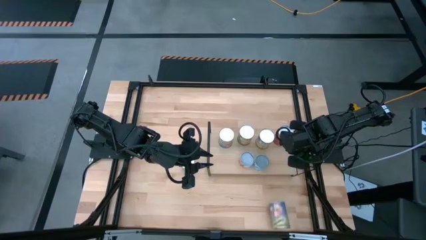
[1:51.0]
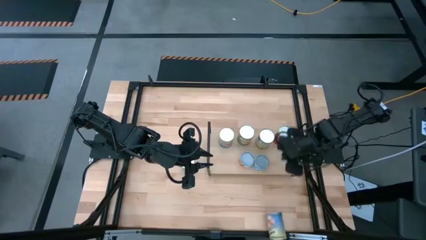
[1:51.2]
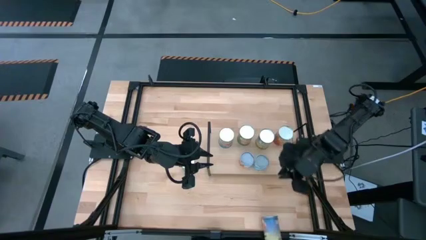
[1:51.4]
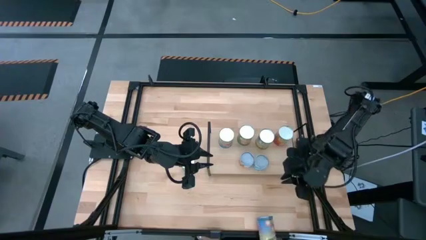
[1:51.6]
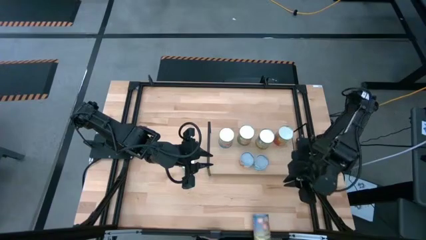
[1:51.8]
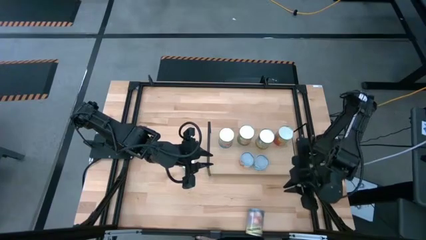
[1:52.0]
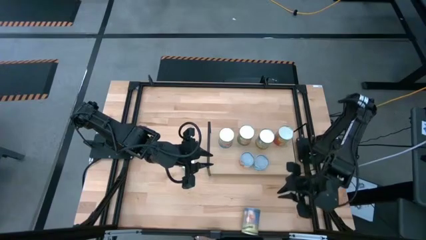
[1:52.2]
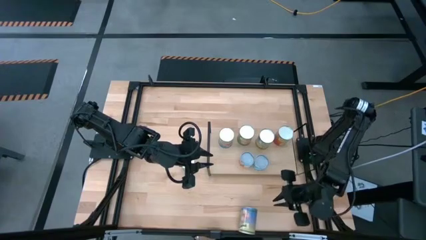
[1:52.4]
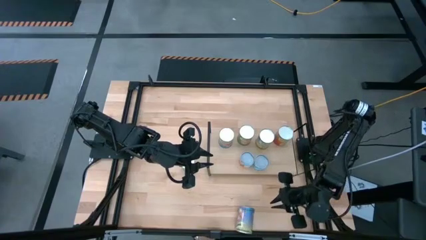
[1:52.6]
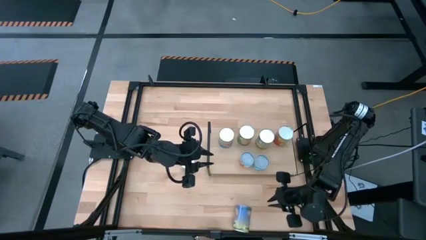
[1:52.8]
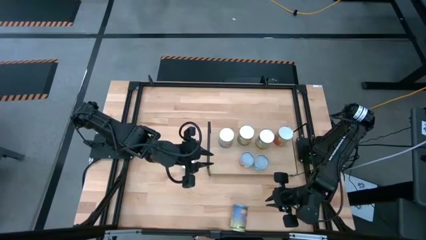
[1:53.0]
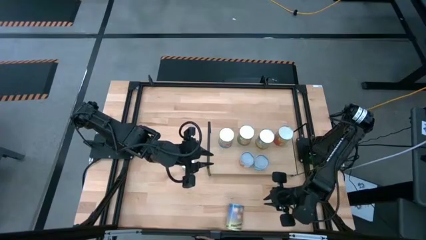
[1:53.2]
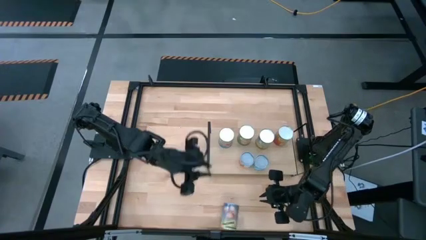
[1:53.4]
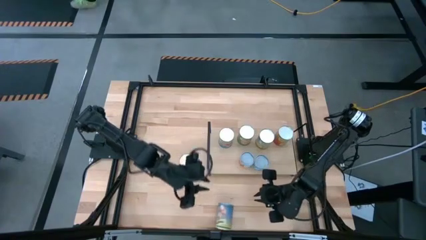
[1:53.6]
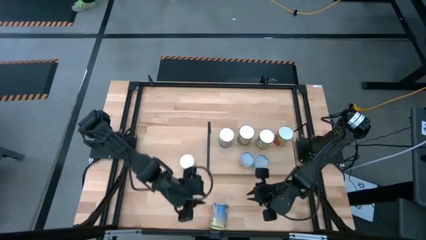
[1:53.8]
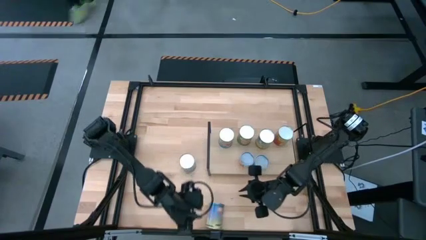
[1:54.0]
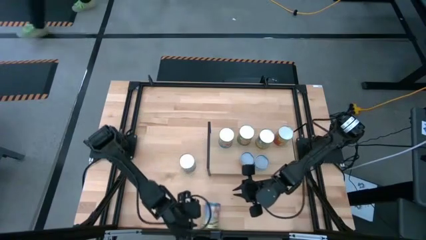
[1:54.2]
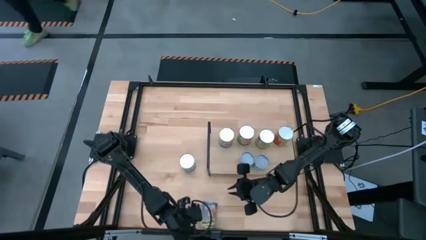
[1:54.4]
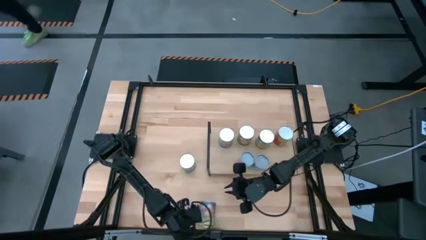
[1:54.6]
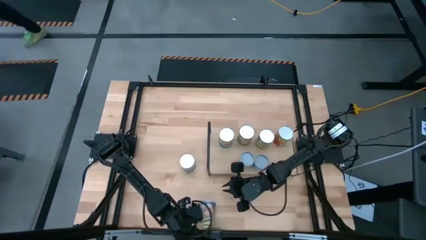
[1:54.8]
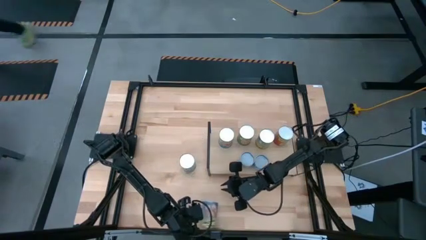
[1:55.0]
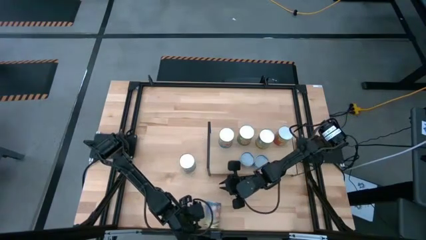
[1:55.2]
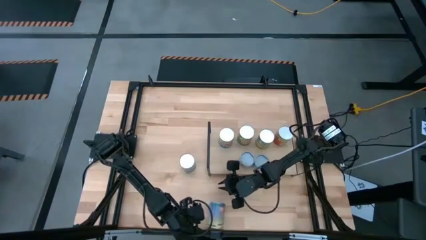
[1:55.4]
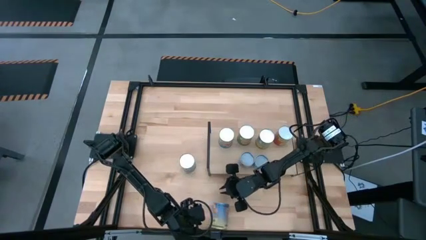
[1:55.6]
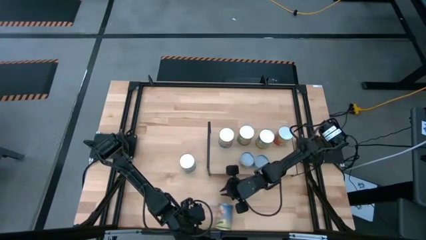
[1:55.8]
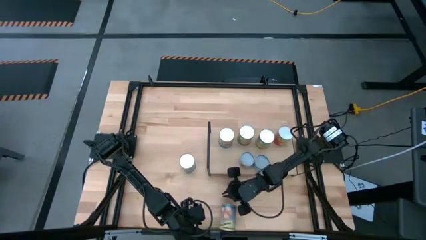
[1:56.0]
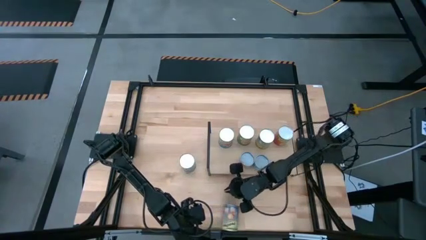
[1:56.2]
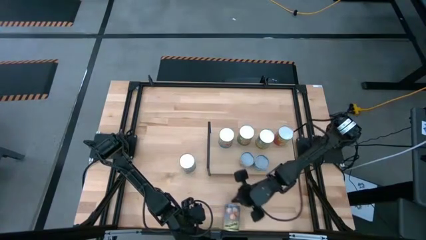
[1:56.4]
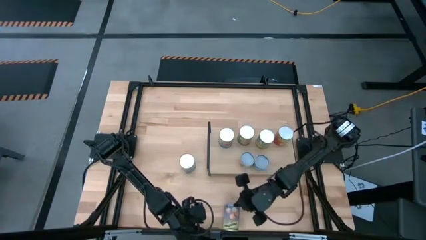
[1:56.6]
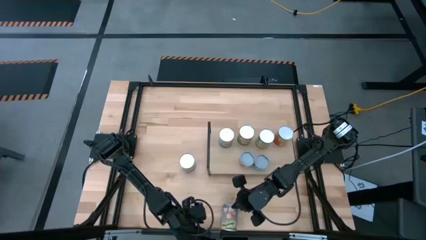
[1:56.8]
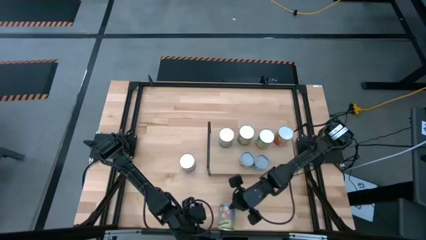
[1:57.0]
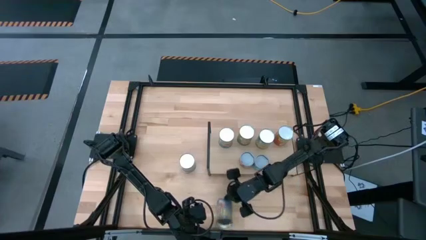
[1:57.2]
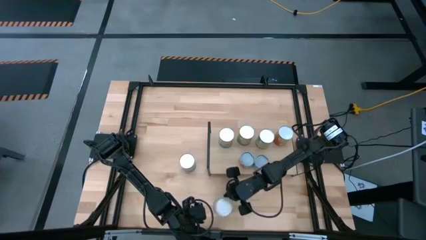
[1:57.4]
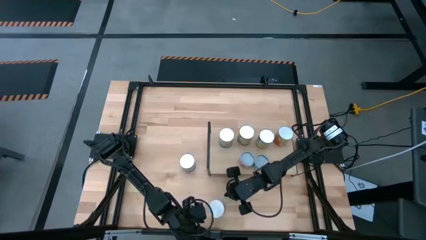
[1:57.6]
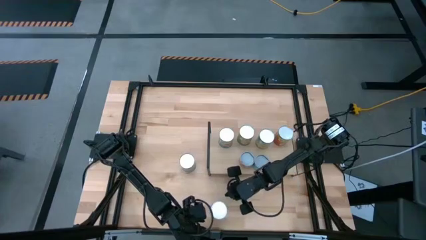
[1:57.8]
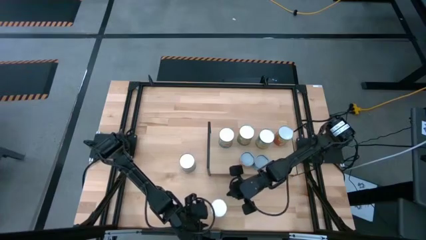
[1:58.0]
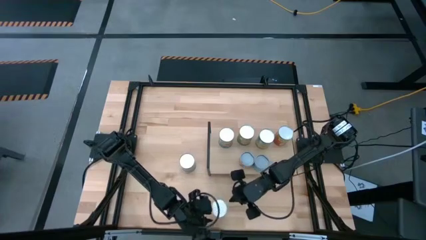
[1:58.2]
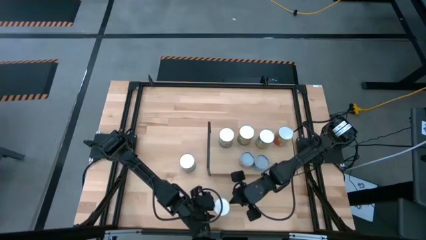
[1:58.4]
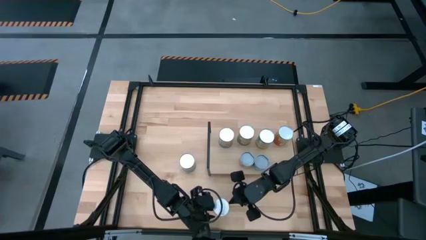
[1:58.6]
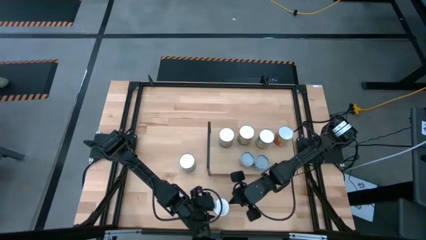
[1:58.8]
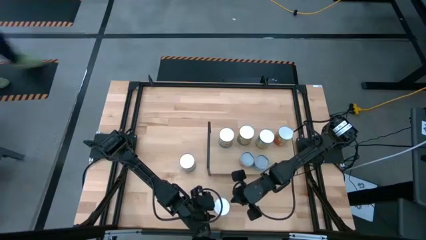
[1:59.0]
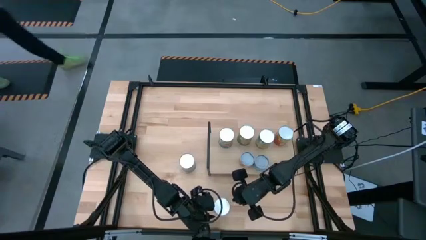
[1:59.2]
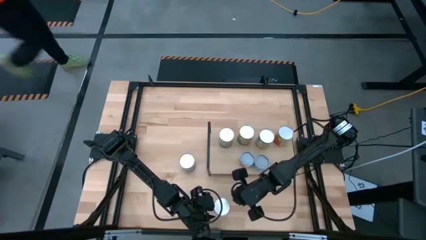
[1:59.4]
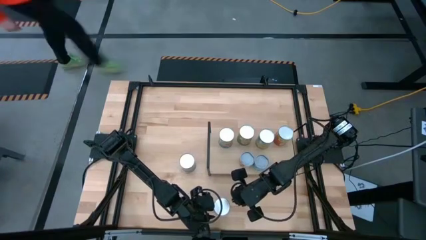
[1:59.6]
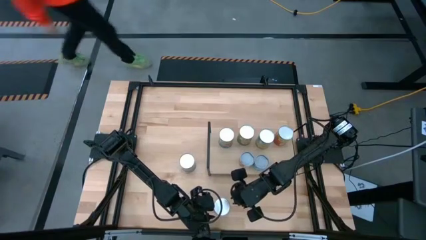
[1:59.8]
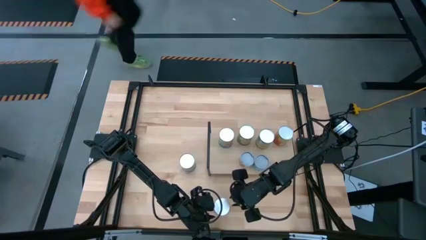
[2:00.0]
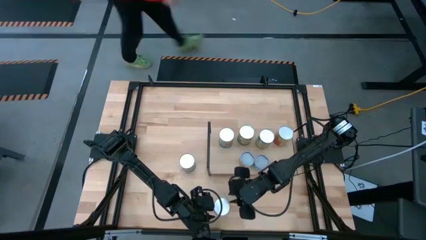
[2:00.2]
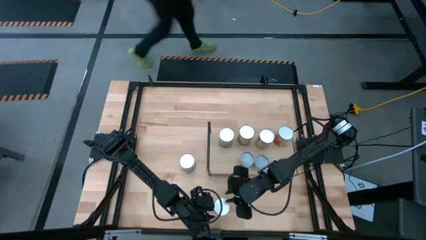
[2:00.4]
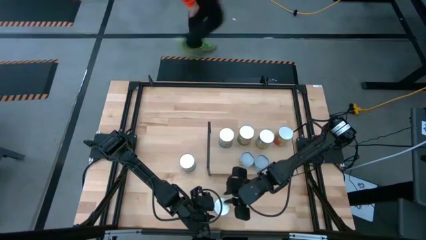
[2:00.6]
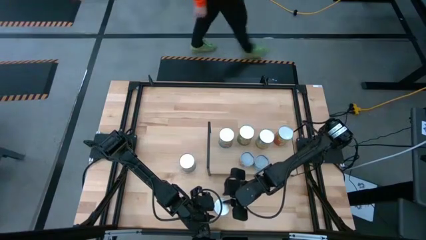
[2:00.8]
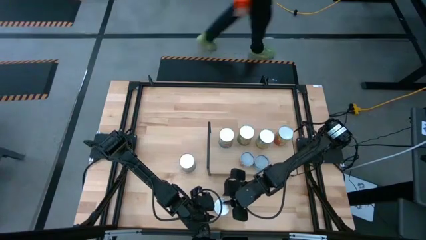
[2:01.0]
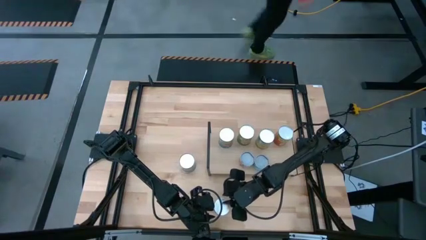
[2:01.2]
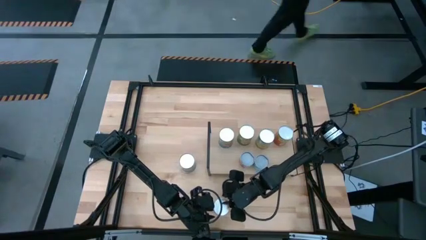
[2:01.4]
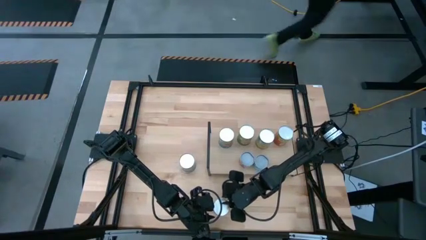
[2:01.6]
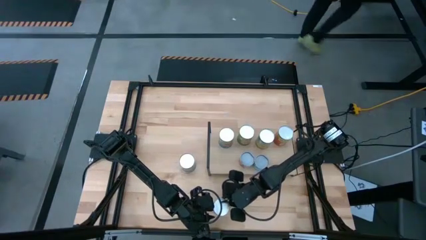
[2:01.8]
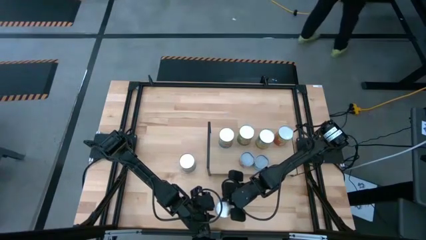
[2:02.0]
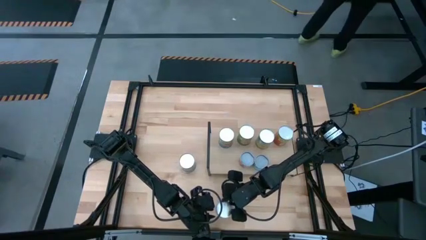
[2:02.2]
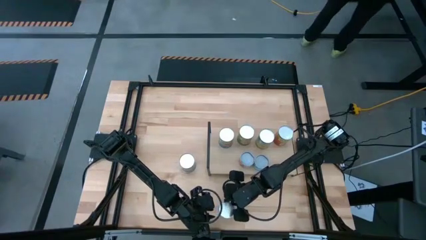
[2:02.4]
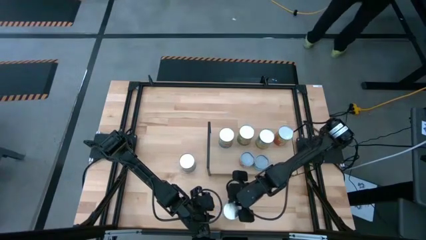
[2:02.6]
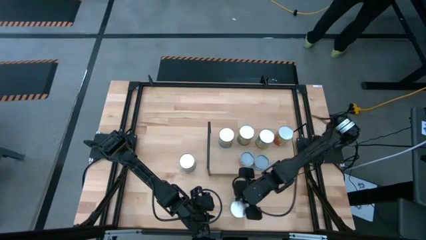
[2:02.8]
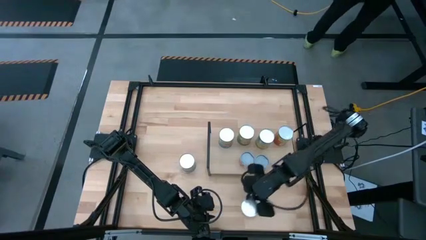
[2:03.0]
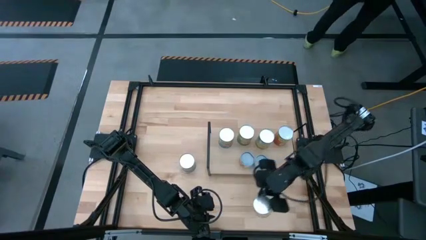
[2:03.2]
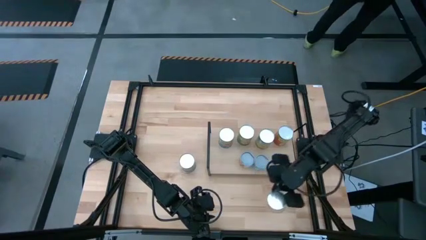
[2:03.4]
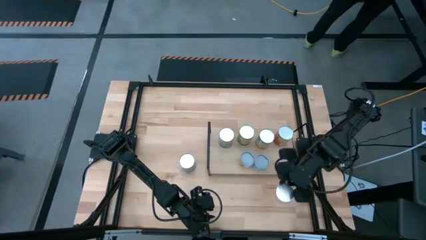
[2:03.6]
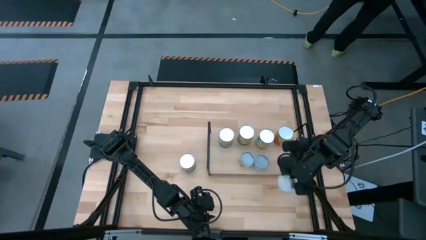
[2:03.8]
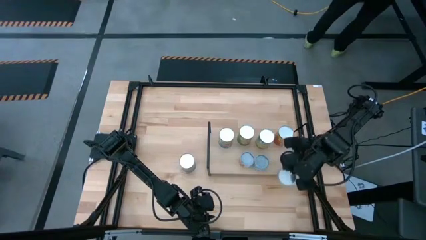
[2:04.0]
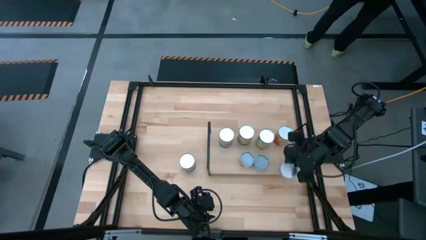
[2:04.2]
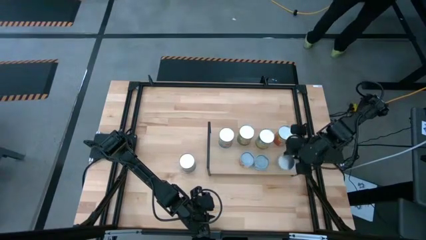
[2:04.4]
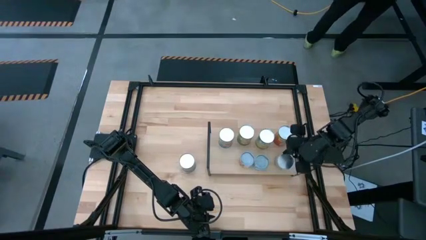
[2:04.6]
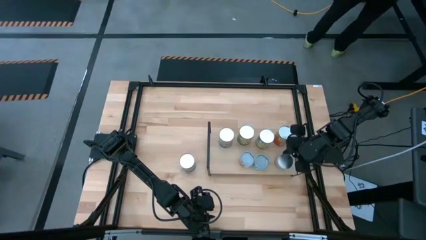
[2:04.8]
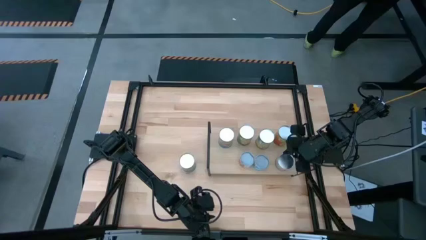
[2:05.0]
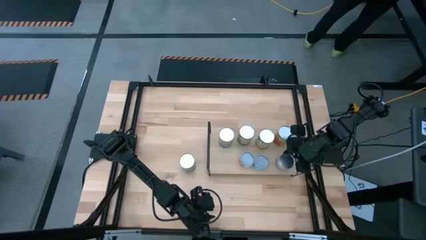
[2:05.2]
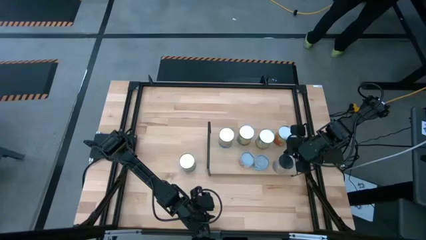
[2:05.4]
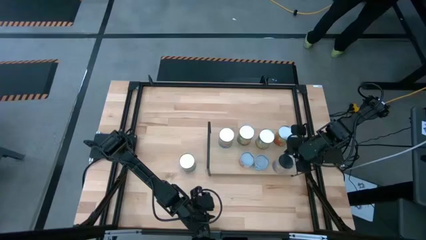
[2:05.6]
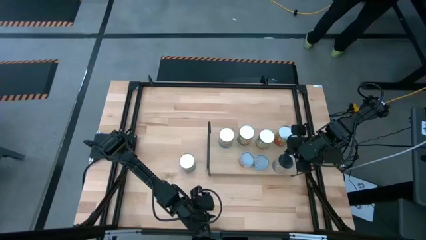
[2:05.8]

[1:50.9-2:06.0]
Task: Pick and place cans onto a shelf
Put the canned peaches on the shelf
